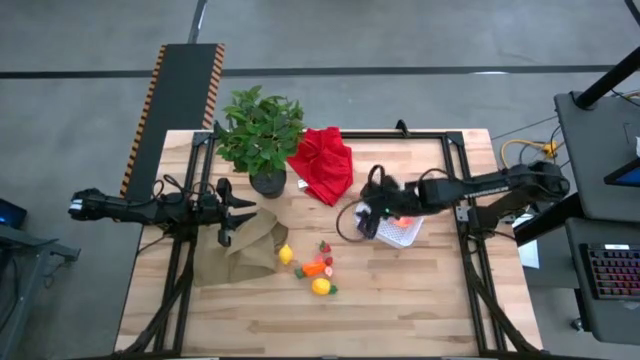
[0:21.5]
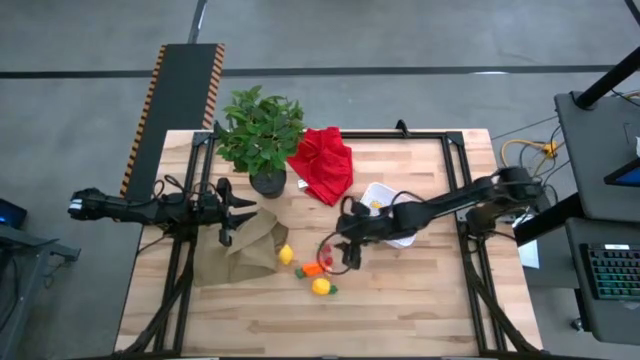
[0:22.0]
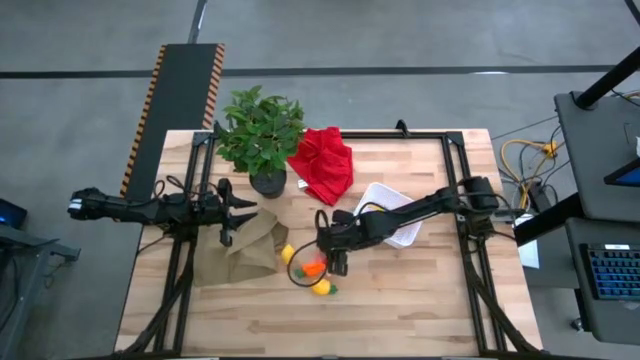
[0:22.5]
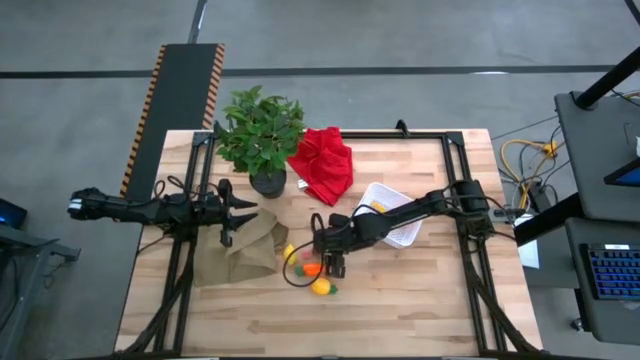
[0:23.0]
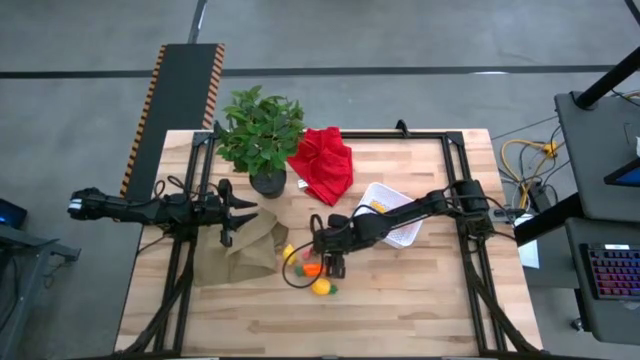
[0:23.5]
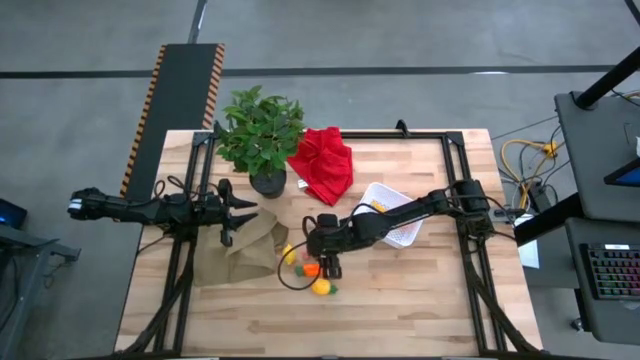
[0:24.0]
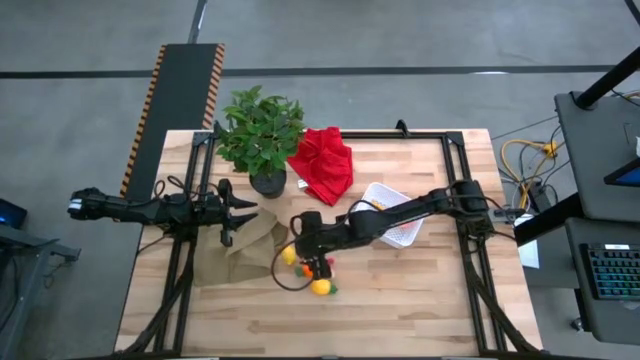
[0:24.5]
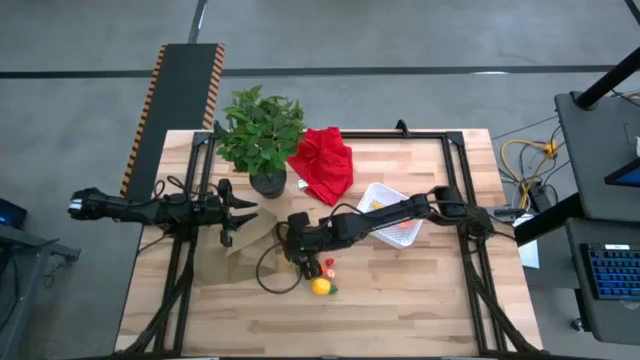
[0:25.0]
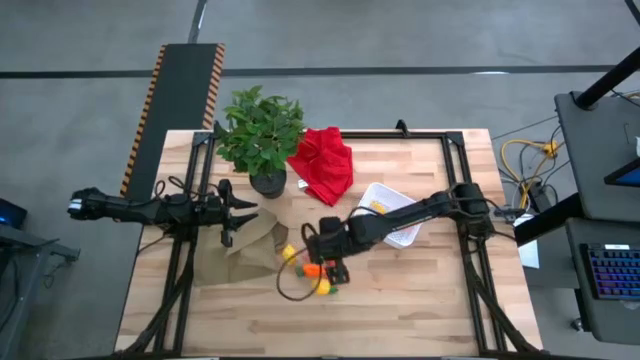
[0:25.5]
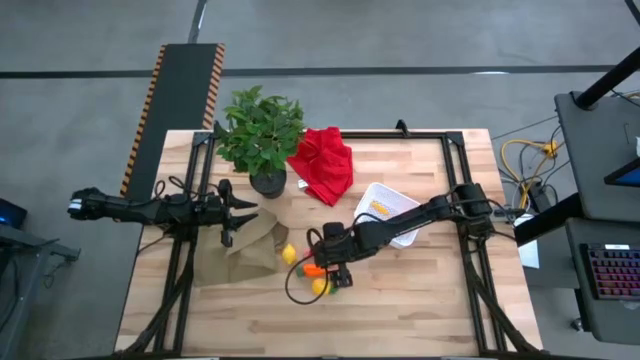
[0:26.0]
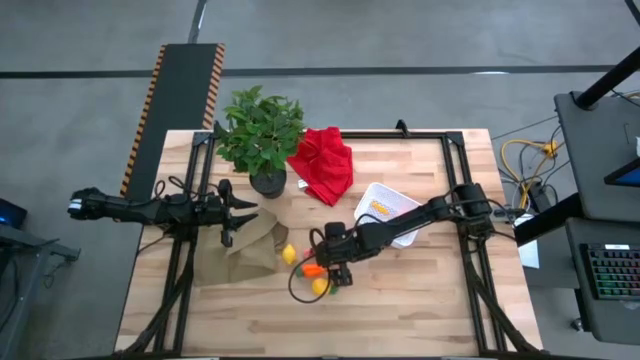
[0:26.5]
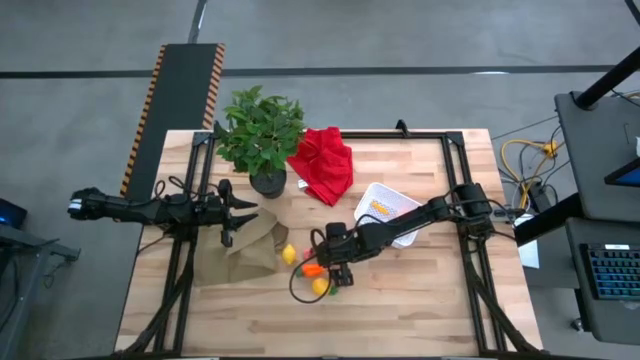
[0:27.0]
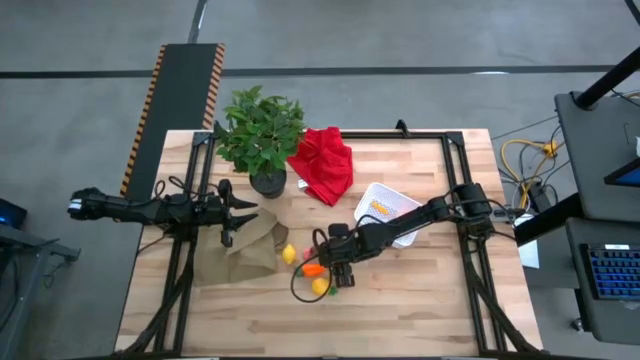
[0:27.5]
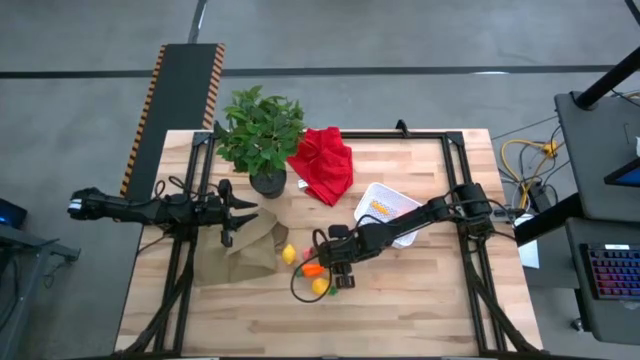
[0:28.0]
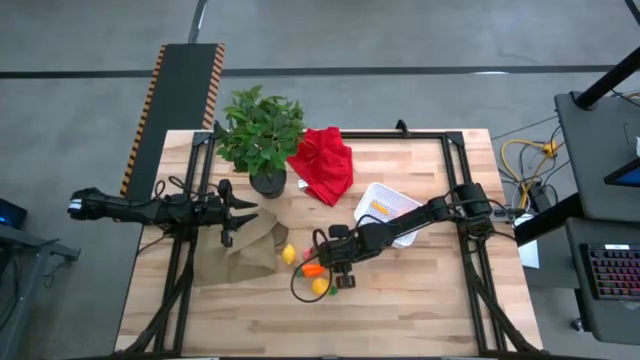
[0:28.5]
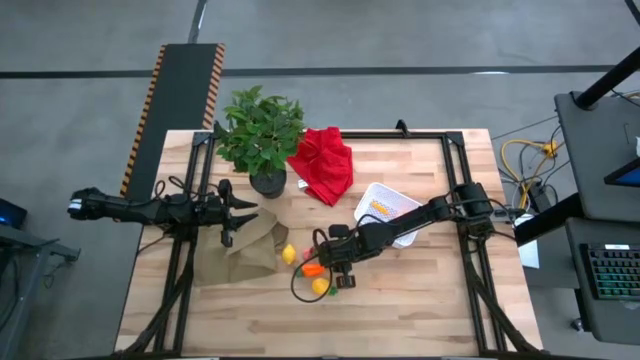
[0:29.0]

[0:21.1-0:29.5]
Task: Pick and placing Produce into tupperware
Put the red raspberry into the white bin

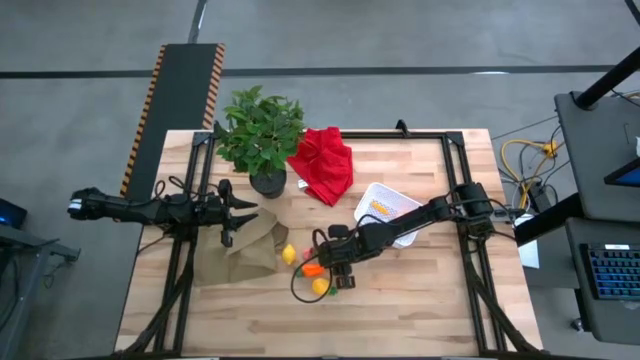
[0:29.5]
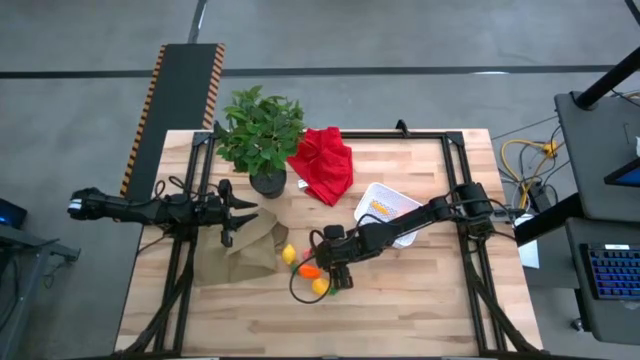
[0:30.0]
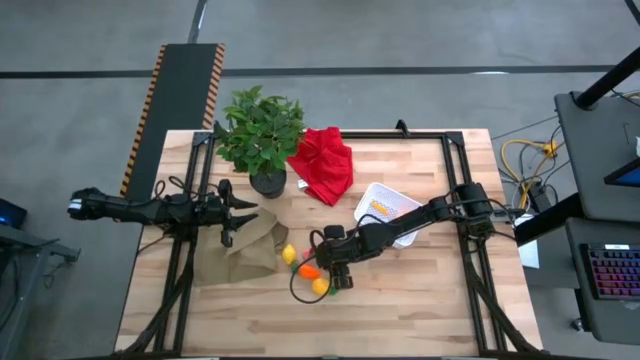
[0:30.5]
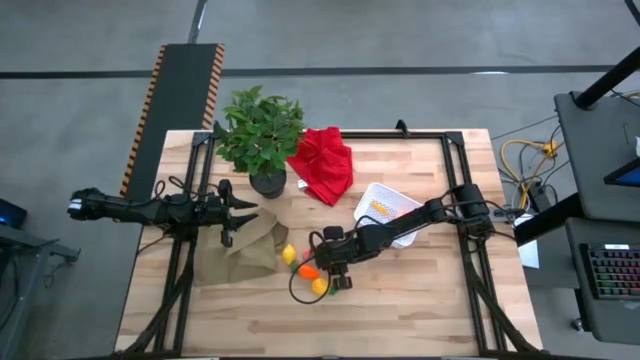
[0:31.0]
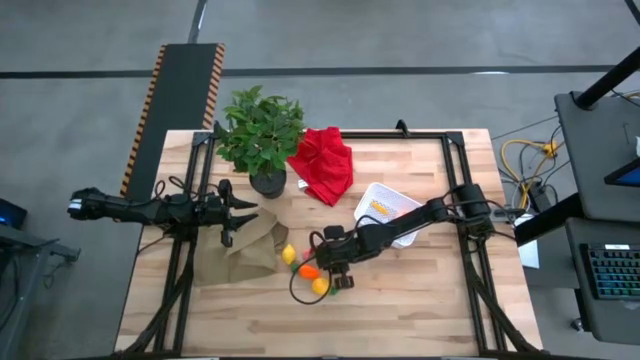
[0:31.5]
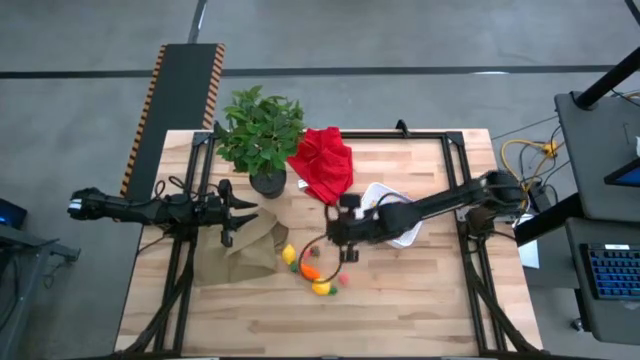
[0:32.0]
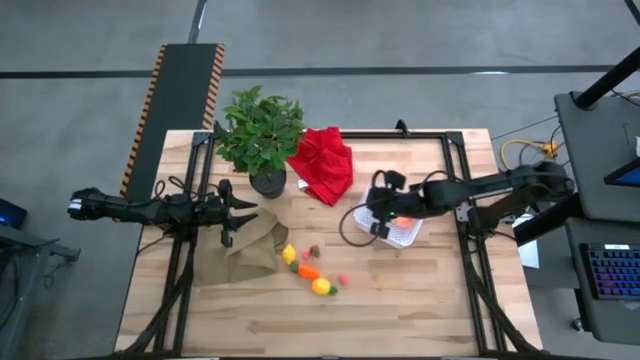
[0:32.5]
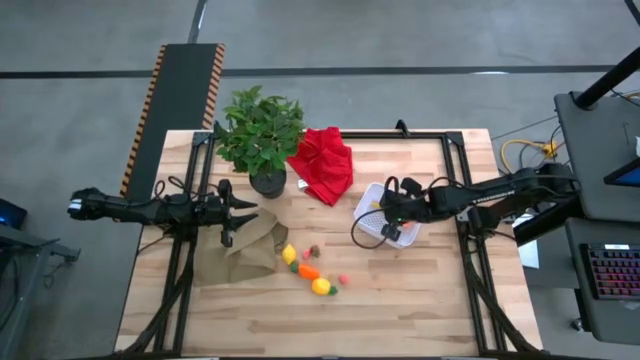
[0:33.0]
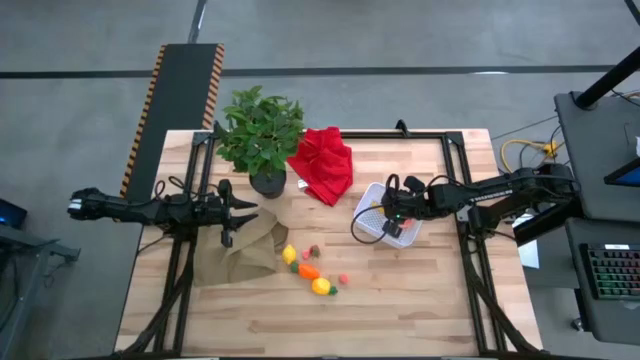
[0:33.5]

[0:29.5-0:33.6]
Put the red raspberry into the white bin

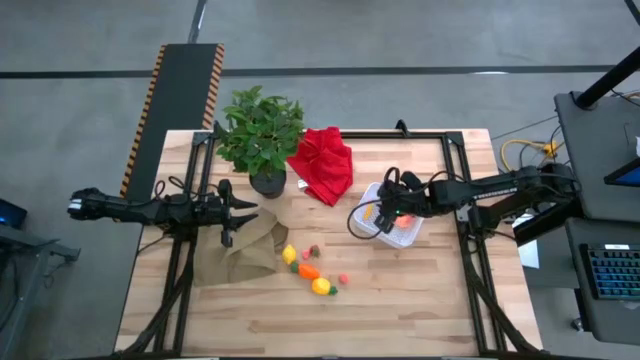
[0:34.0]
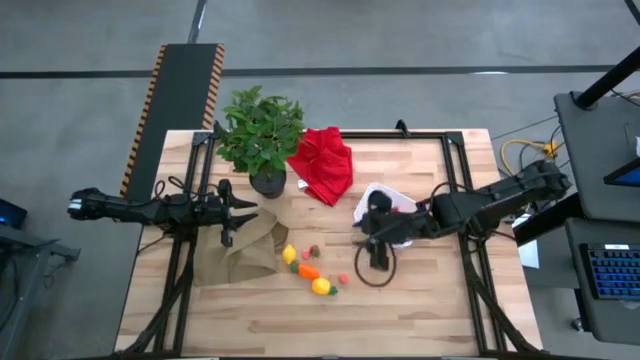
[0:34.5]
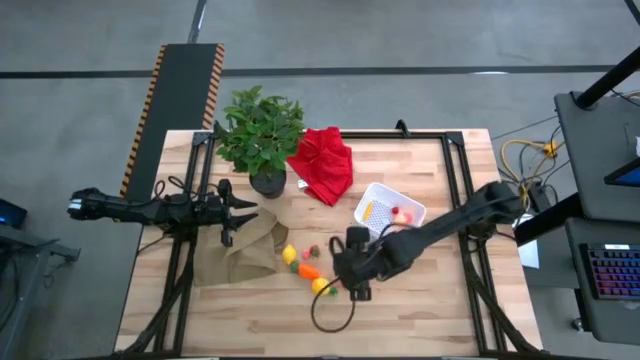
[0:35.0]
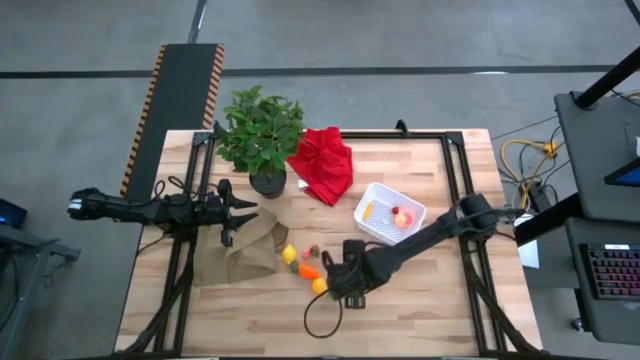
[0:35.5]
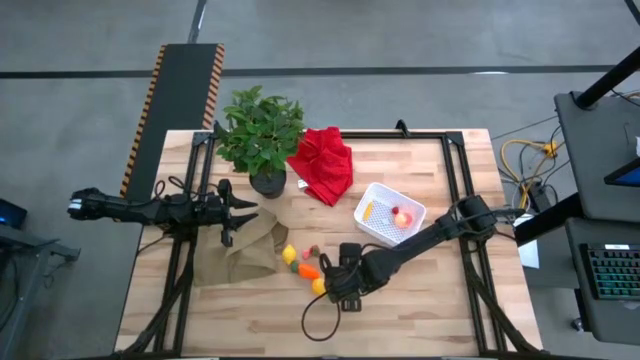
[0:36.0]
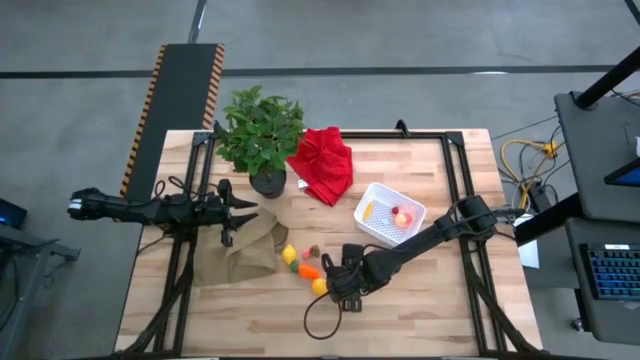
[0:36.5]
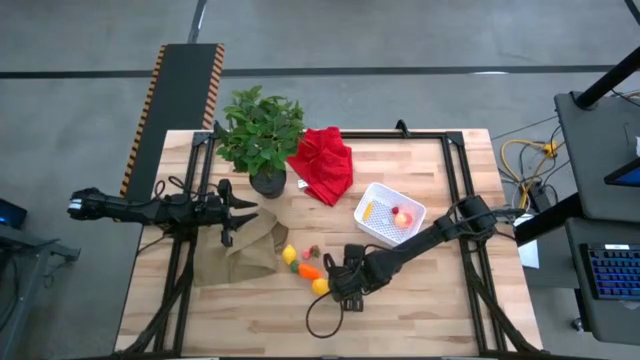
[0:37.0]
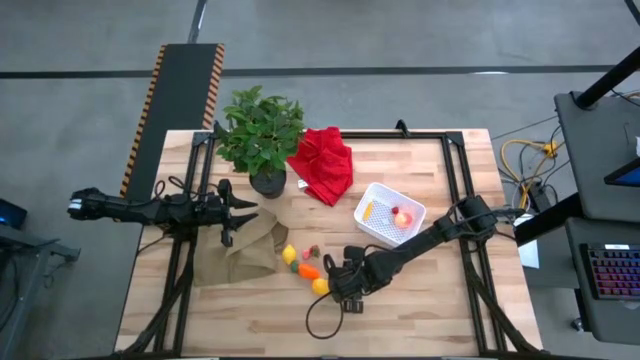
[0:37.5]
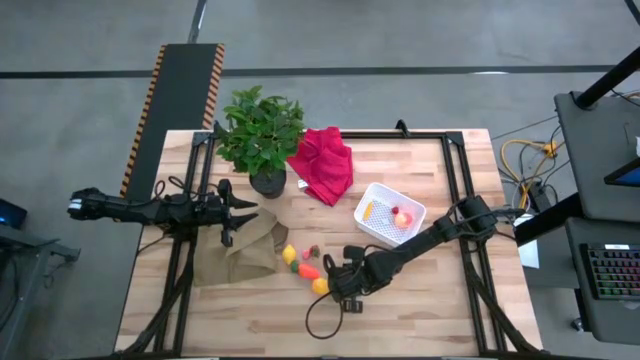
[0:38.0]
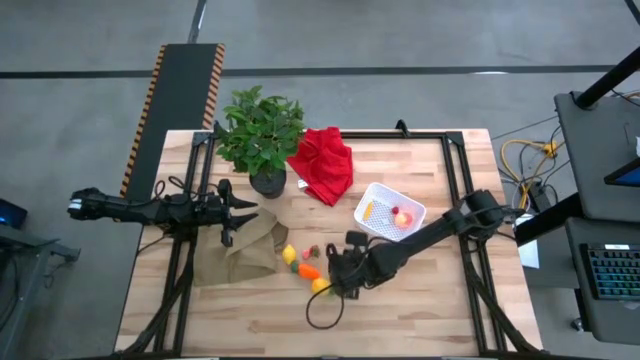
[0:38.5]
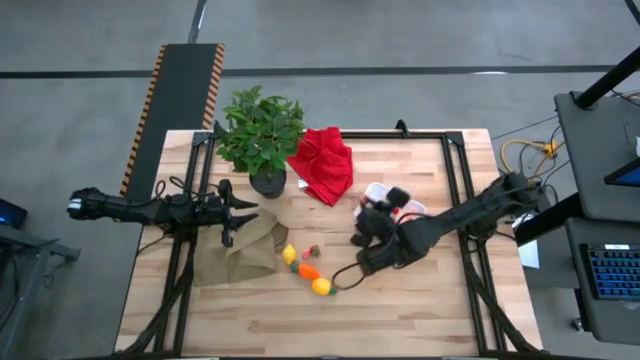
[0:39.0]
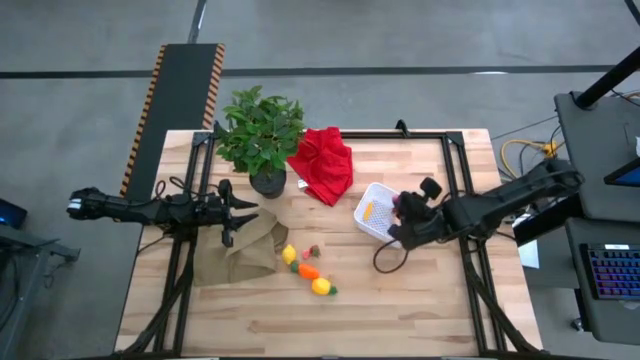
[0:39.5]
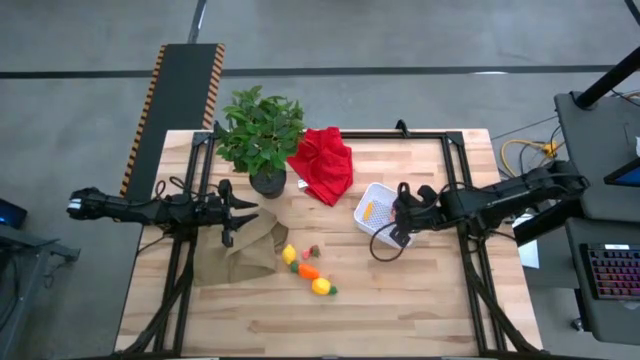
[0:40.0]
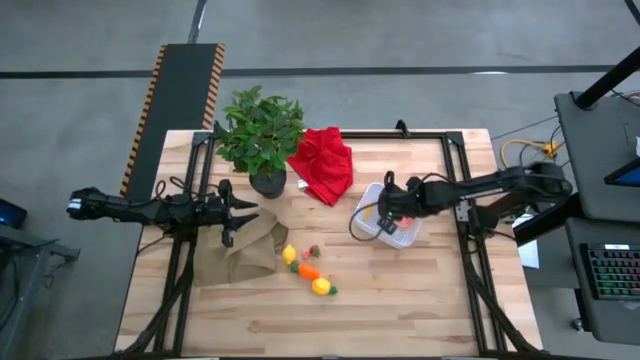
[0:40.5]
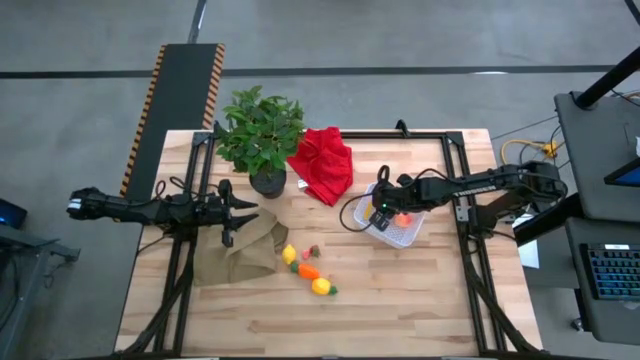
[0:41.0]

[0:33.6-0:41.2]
Put the bottom pink apricot into the white bin
